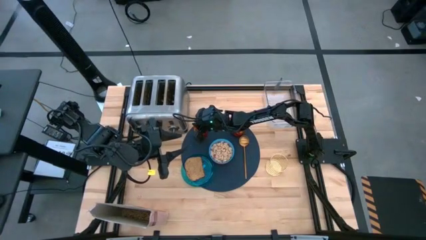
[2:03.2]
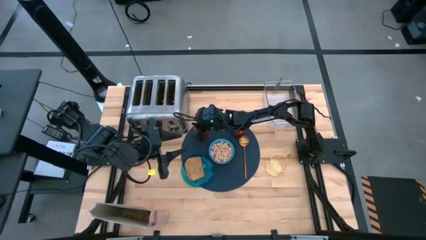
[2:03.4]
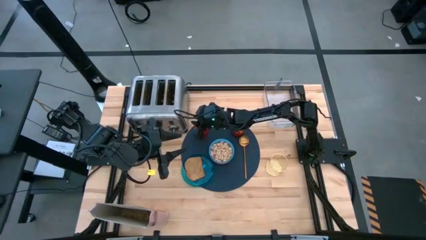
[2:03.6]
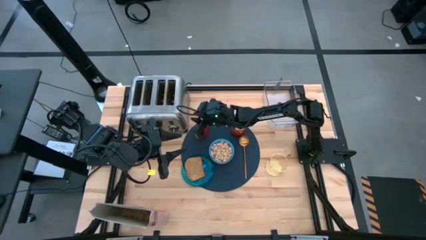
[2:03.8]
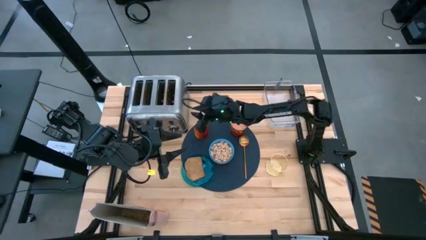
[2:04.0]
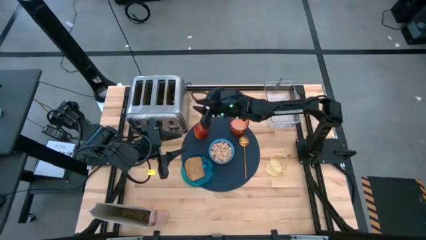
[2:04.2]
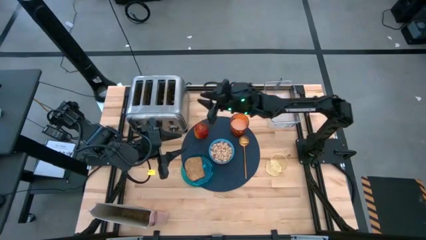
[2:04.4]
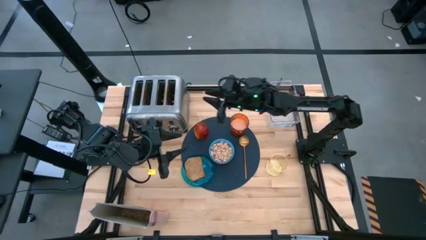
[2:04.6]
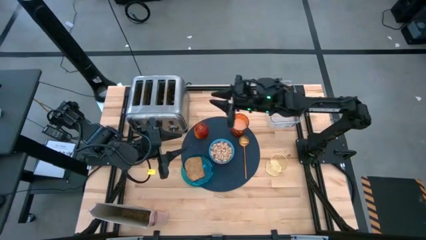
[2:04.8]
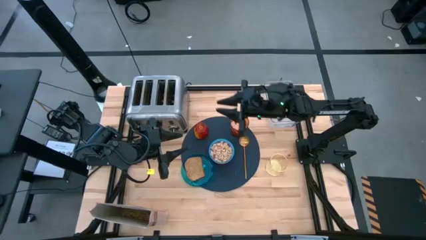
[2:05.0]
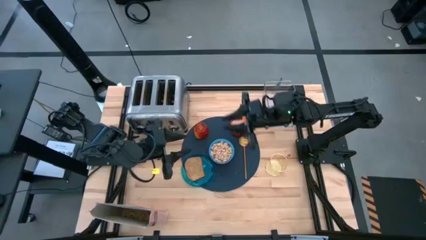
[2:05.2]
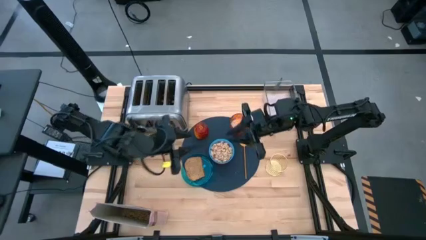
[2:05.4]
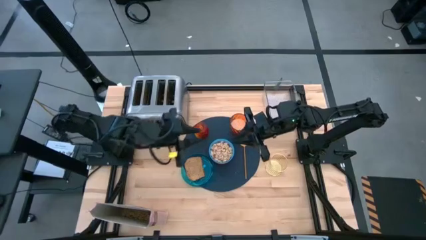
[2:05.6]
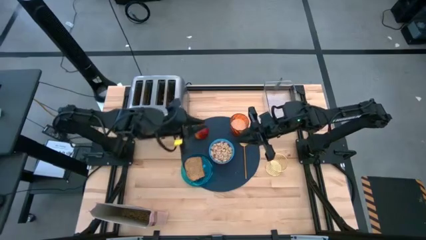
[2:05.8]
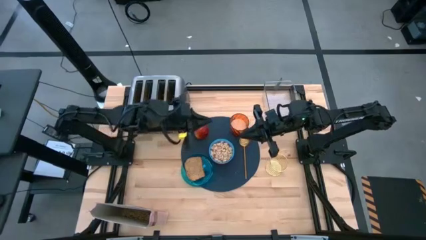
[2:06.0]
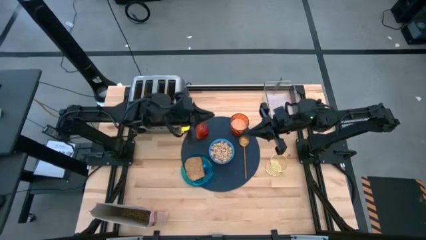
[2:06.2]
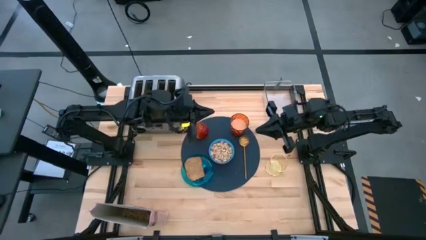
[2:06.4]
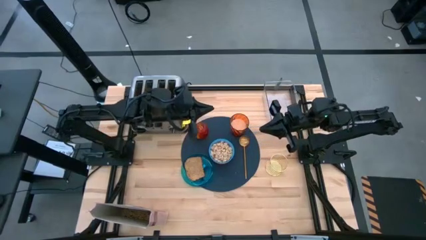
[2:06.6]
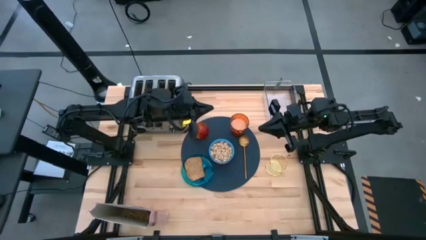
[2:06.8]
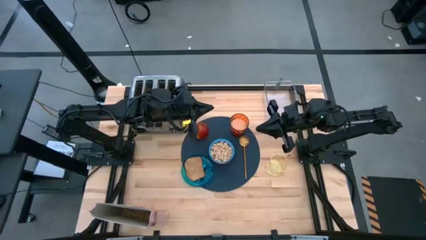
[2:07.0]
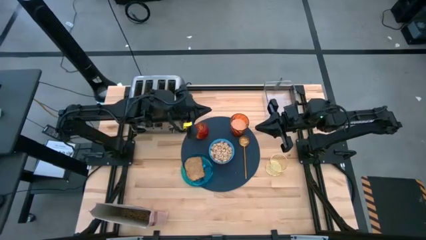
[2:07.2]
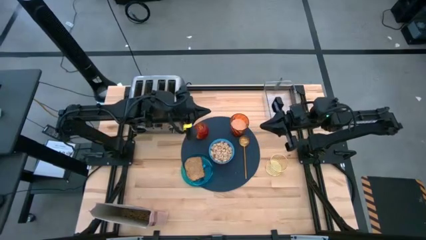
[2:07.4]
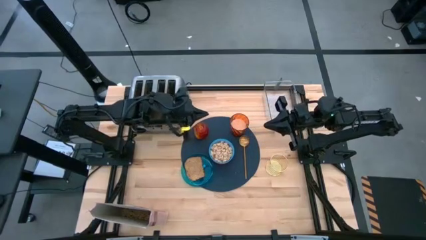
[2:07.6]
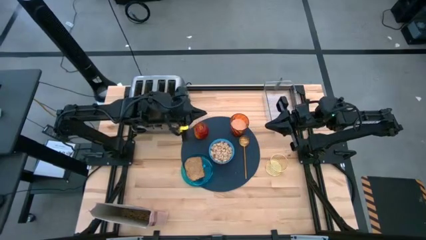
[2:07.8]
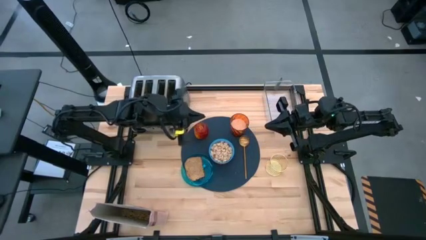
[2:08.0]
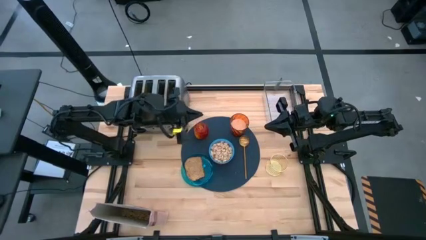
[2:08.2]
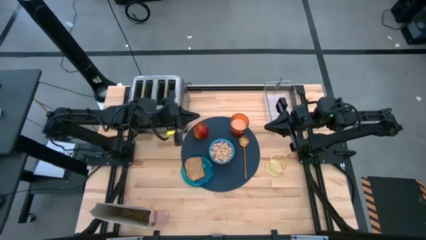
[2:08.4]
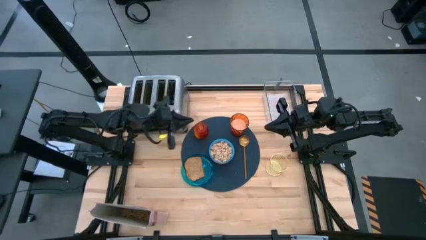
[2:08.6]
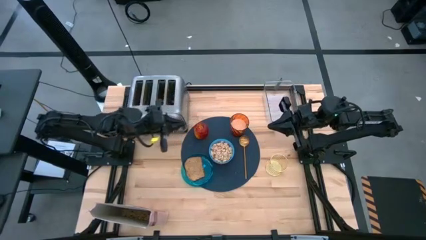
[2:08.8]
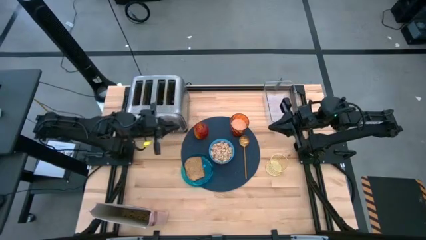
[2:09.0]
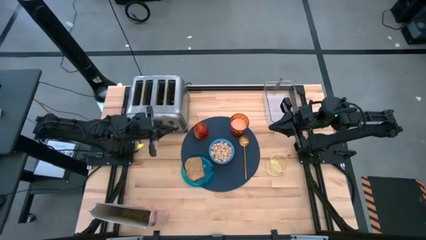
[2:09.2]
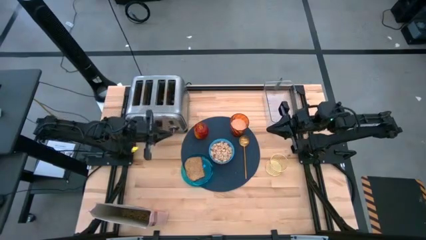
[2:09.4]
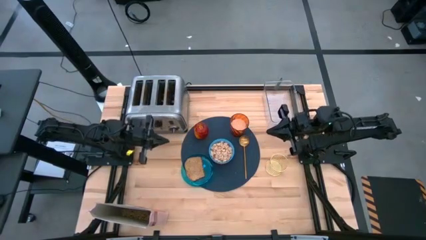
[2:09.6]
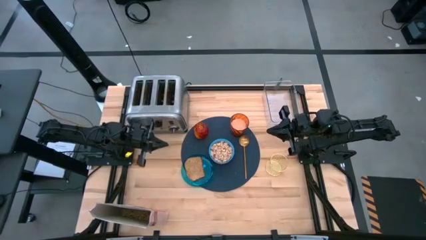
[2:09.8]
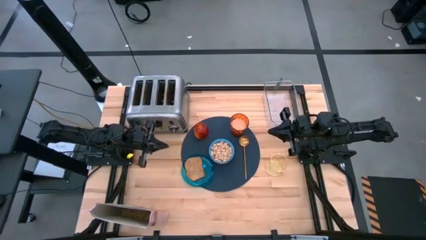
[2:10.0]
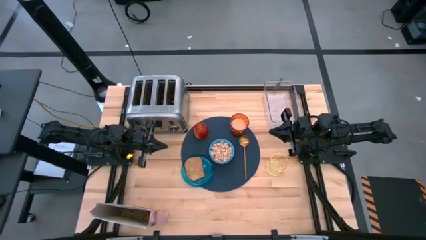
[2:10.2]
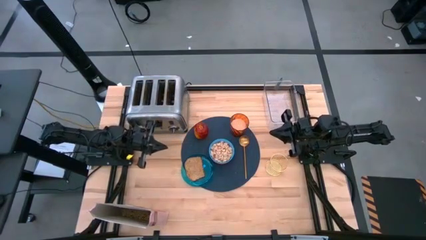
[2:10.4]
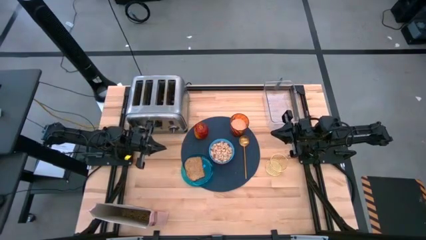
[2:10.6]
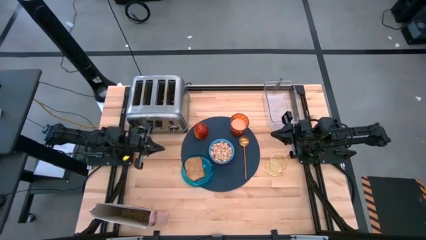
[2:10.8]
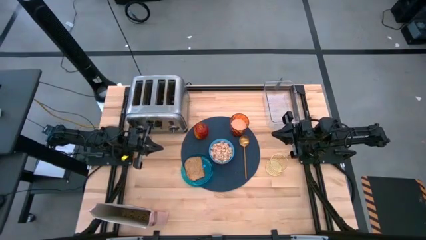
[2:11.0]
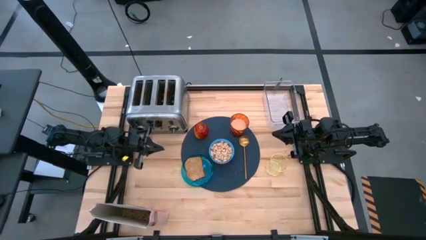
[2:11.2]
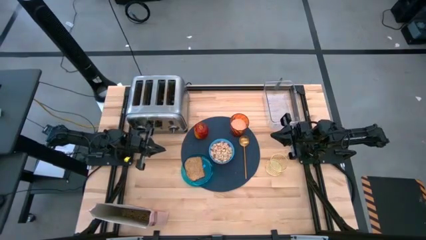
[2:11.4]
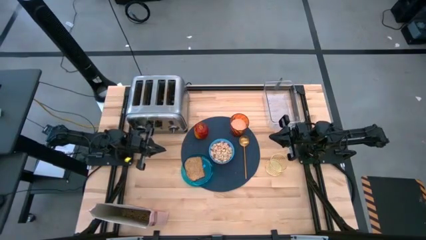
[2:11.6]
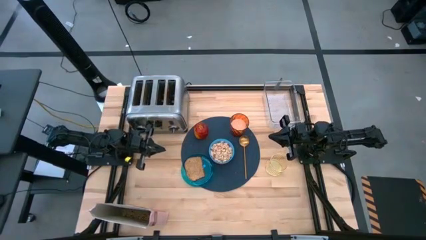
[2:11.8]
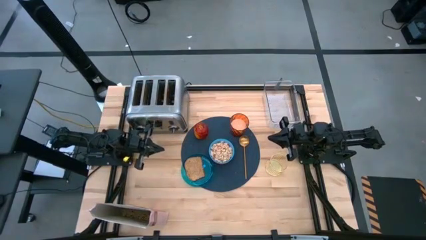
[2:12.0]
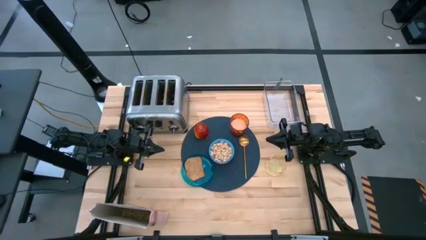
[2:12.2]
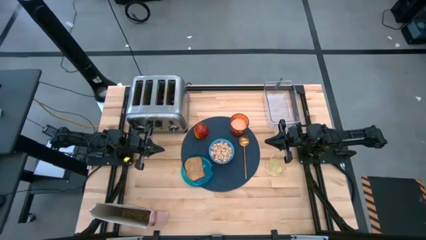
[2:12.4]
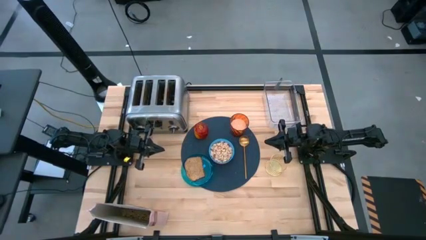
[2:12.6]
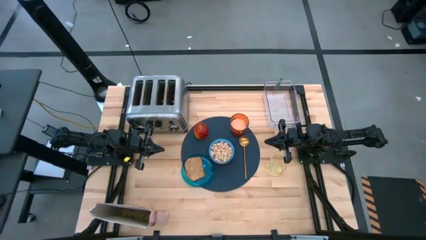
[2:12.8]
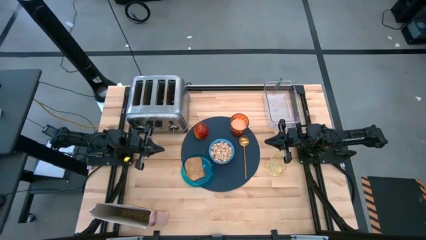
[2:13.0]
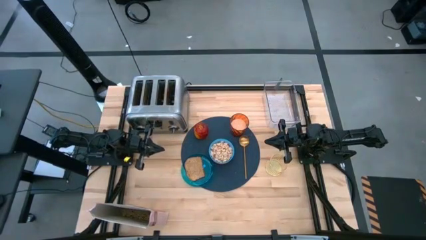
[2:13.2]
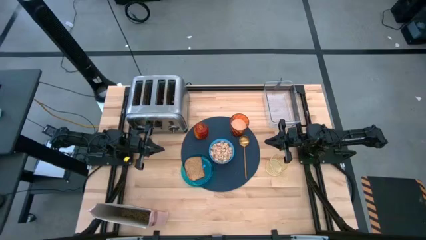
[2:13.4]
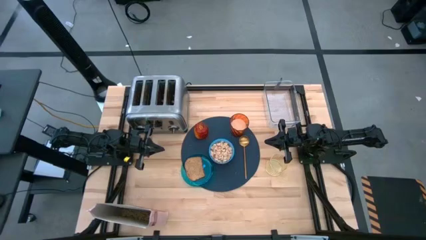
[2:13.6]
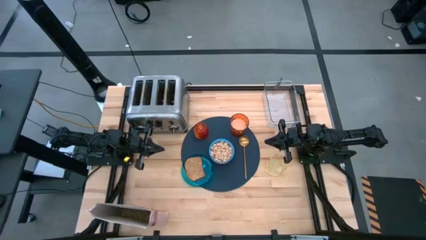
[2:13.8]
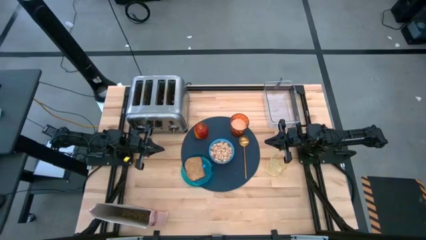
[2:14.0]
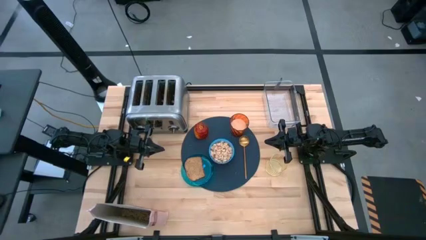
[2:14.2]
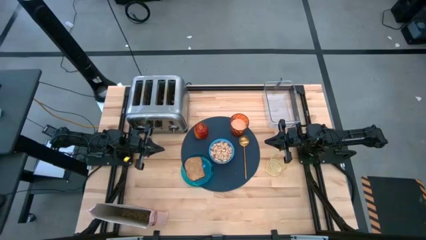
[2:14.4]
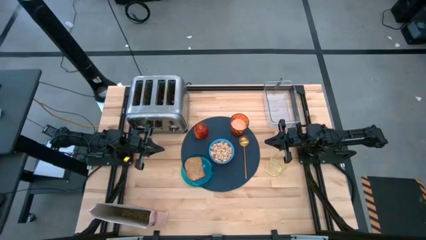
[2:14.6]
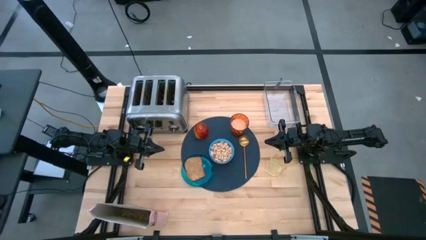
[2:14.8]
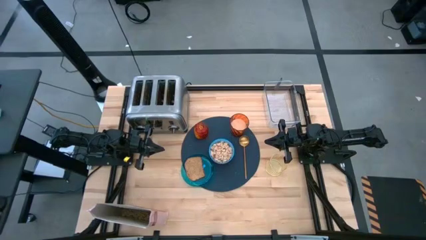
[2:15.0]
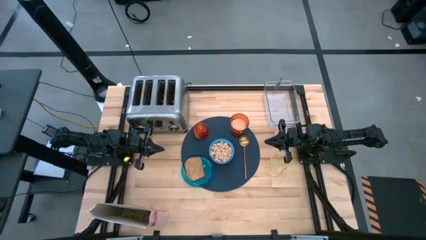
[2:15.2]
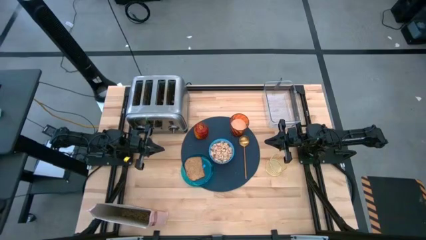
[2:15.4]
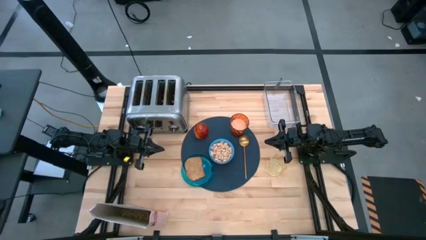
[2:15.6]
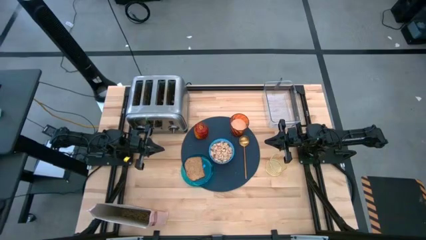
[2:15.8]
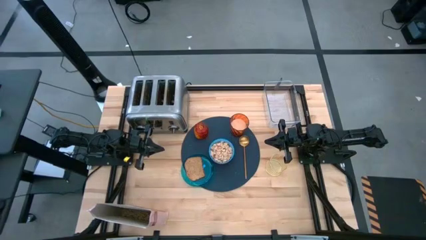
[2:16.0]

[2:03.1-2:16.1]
Task: Arrange a breakfast setting
Return to Home Position
